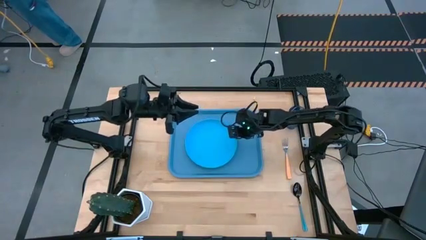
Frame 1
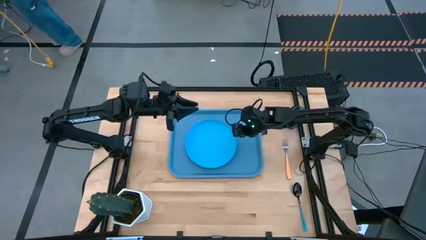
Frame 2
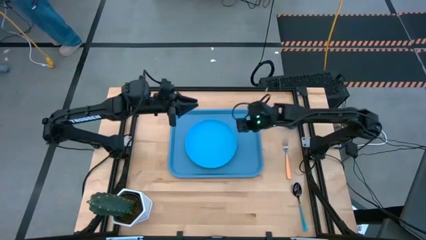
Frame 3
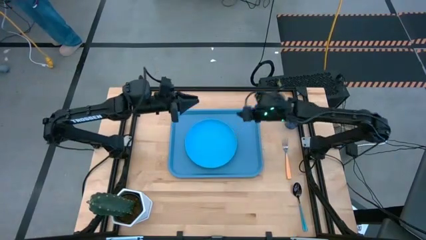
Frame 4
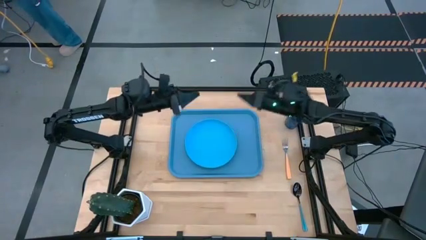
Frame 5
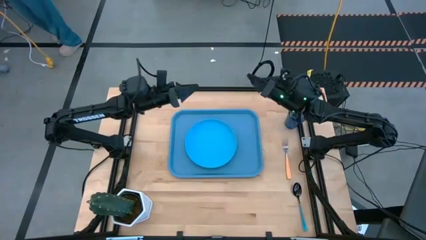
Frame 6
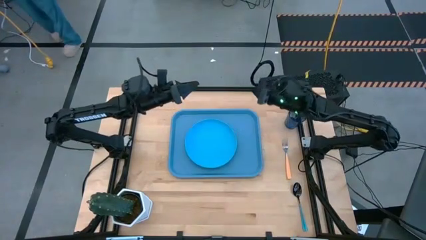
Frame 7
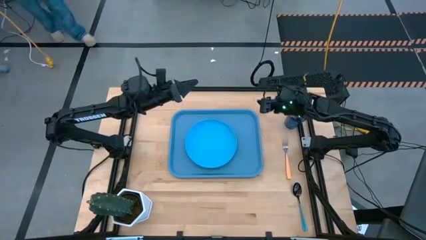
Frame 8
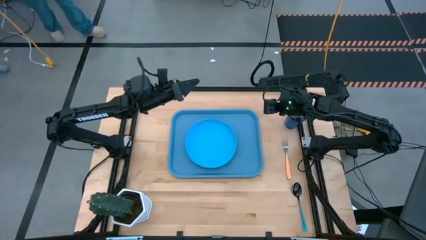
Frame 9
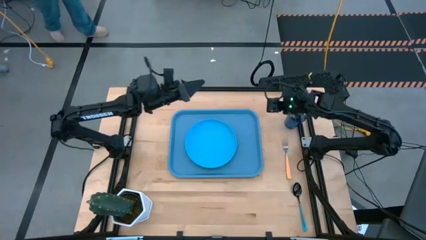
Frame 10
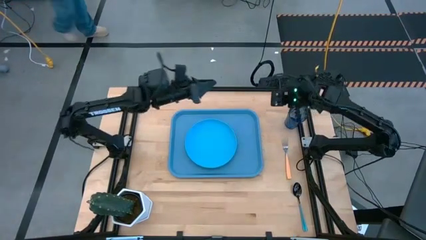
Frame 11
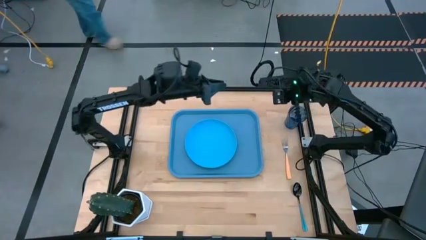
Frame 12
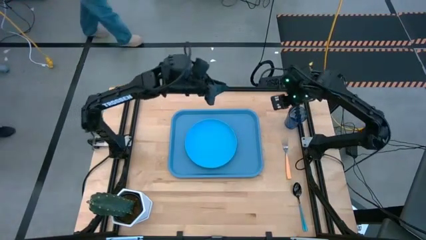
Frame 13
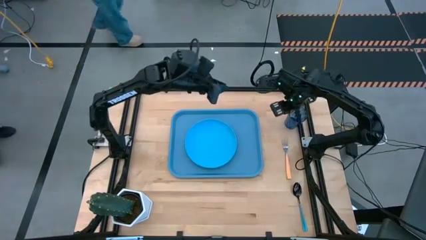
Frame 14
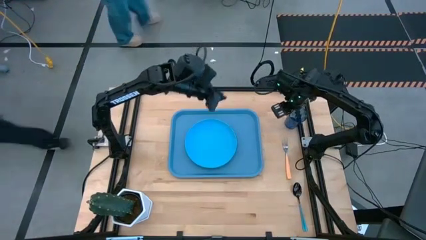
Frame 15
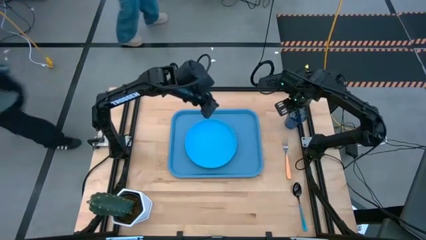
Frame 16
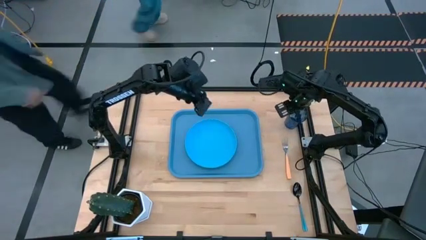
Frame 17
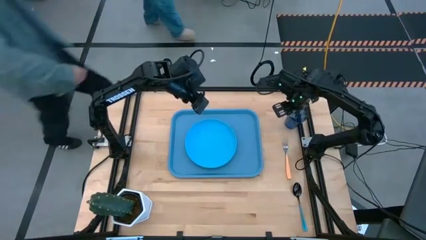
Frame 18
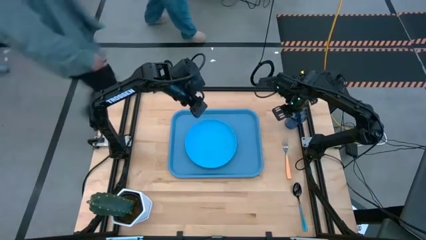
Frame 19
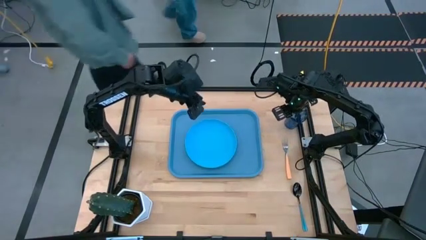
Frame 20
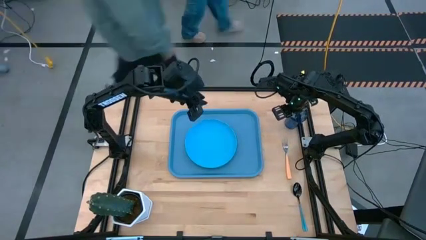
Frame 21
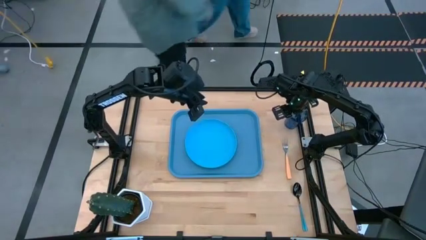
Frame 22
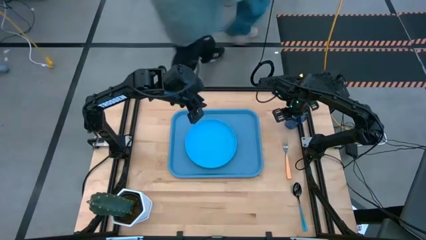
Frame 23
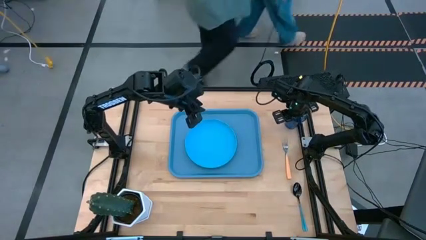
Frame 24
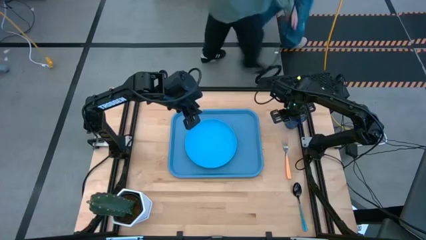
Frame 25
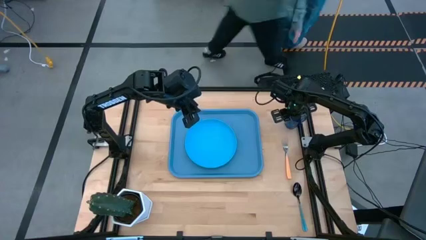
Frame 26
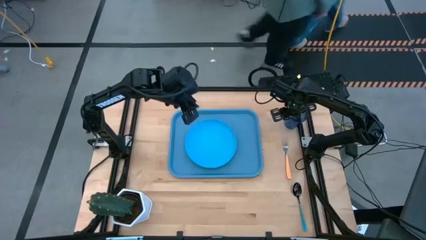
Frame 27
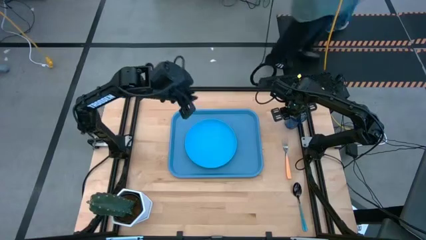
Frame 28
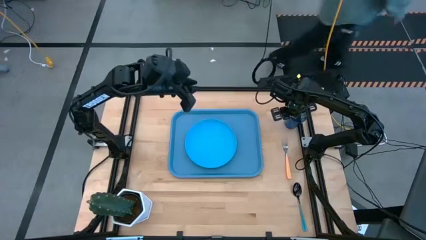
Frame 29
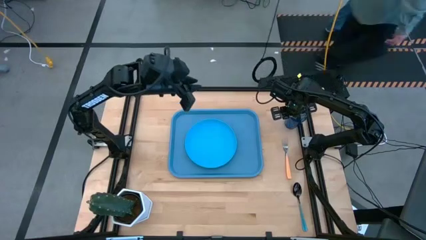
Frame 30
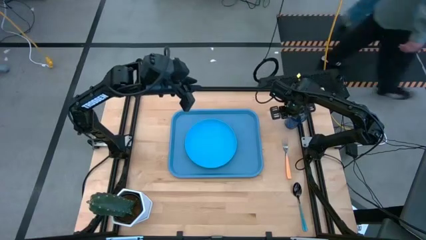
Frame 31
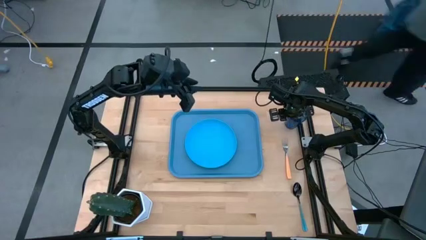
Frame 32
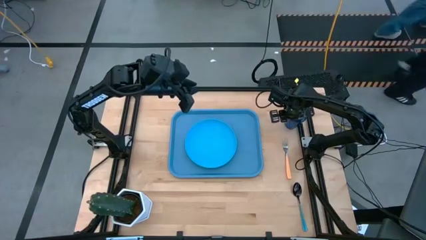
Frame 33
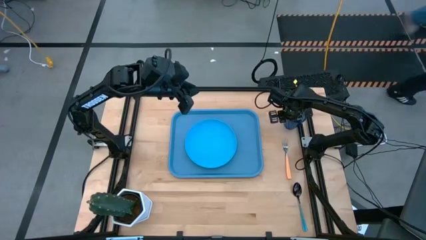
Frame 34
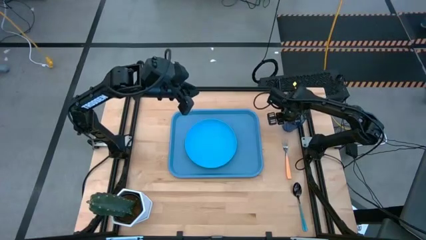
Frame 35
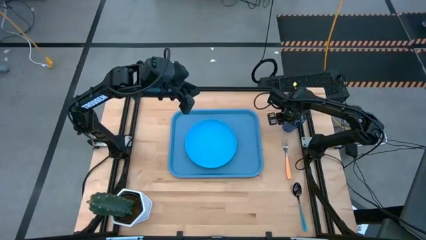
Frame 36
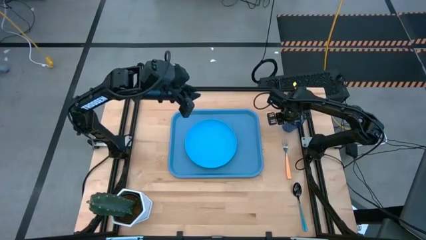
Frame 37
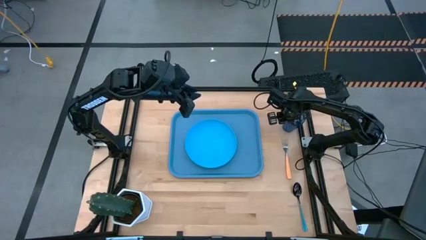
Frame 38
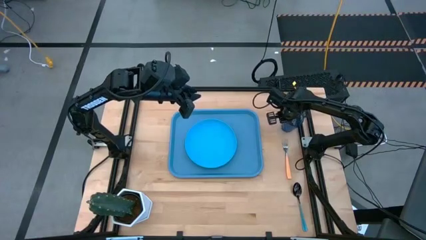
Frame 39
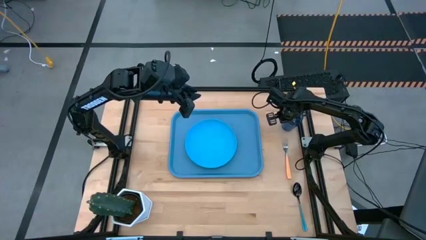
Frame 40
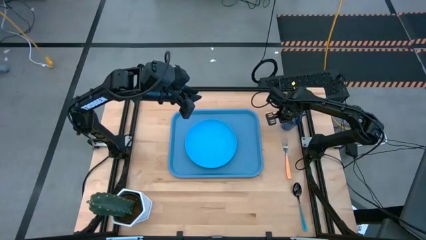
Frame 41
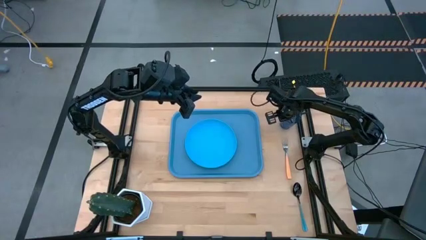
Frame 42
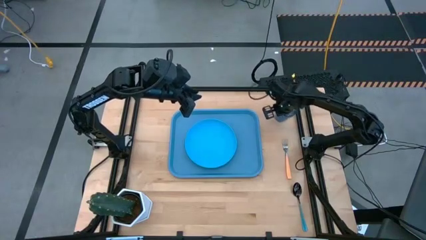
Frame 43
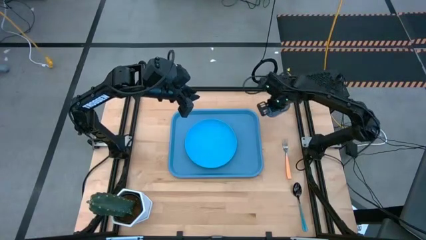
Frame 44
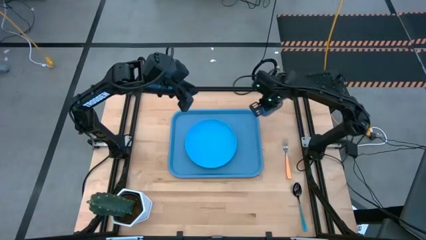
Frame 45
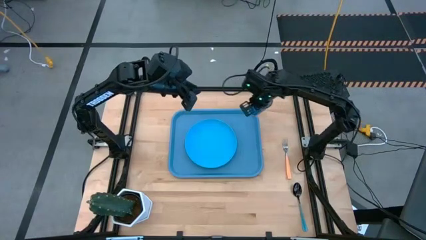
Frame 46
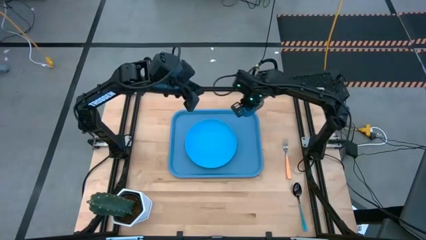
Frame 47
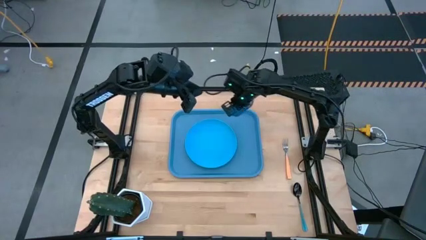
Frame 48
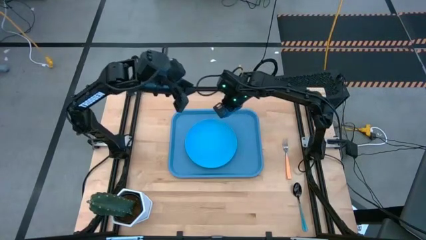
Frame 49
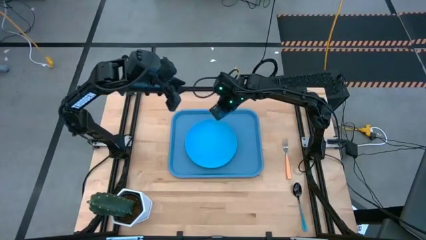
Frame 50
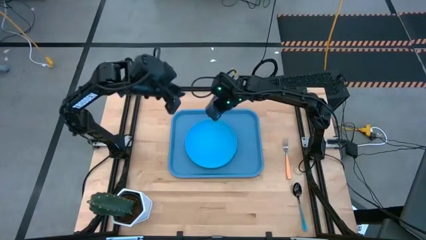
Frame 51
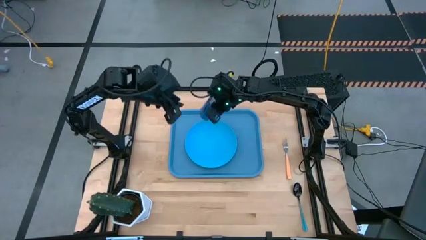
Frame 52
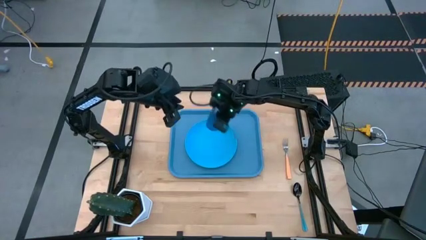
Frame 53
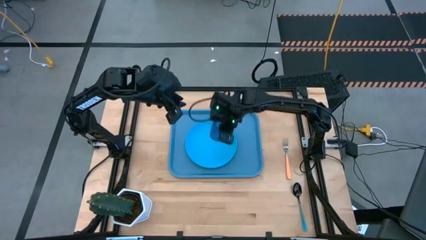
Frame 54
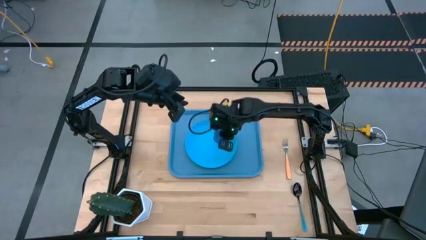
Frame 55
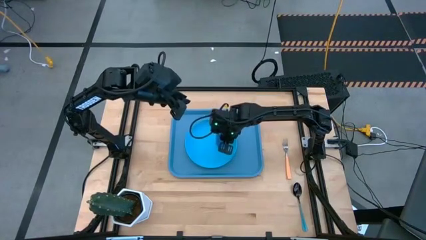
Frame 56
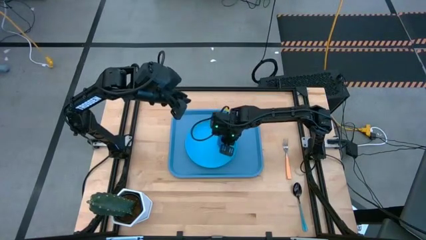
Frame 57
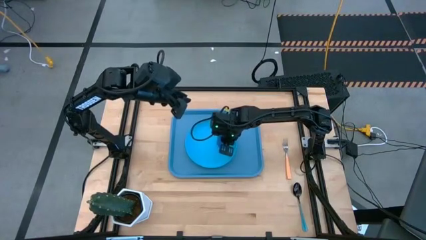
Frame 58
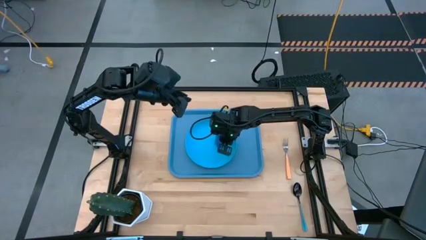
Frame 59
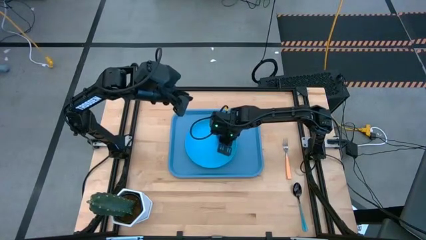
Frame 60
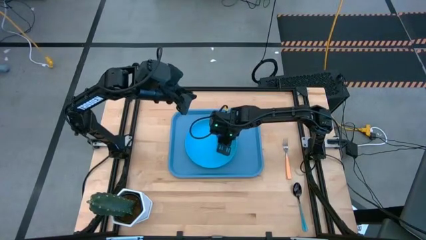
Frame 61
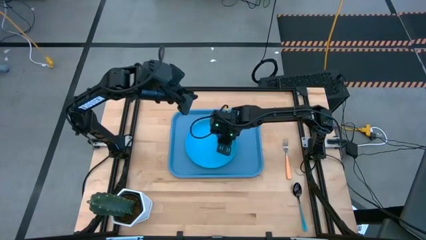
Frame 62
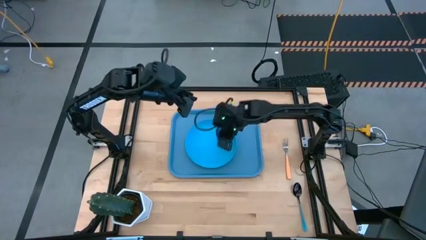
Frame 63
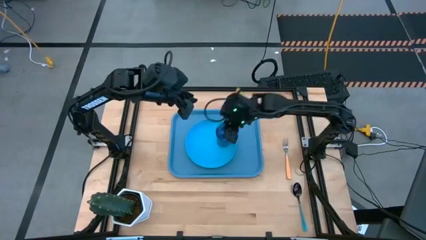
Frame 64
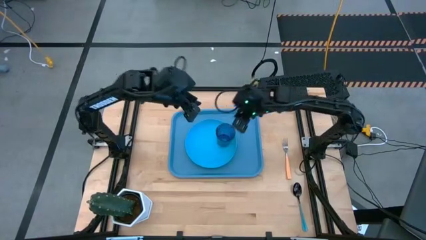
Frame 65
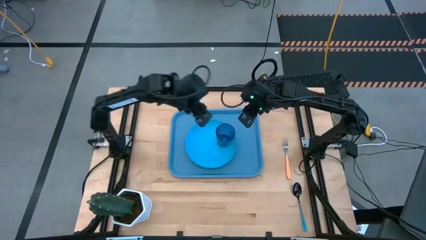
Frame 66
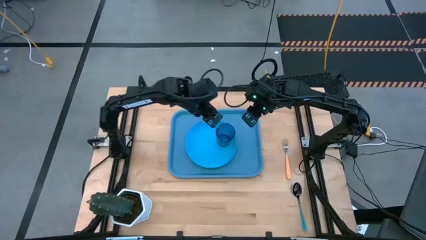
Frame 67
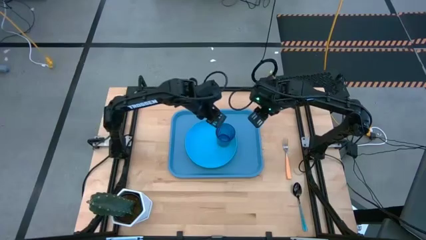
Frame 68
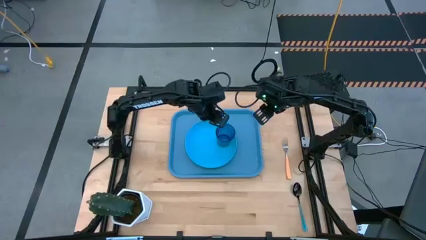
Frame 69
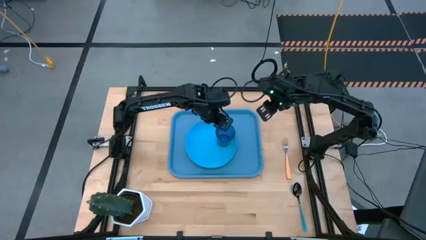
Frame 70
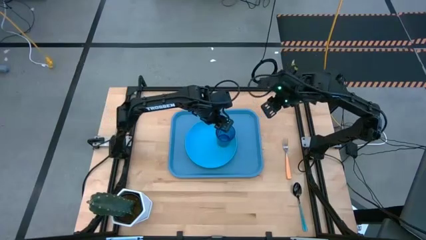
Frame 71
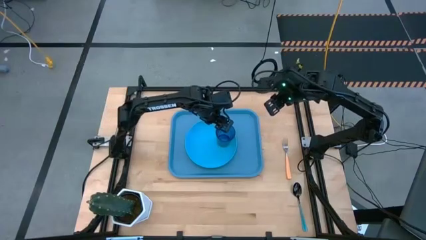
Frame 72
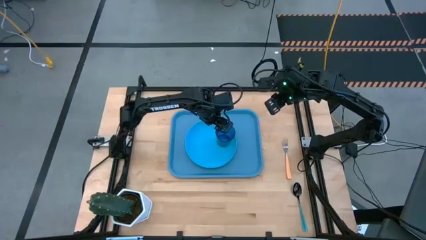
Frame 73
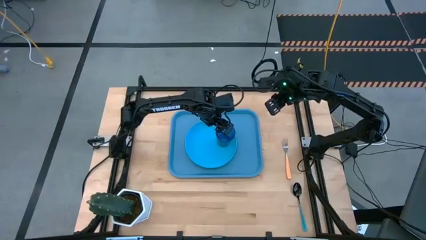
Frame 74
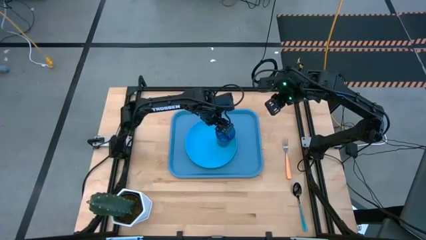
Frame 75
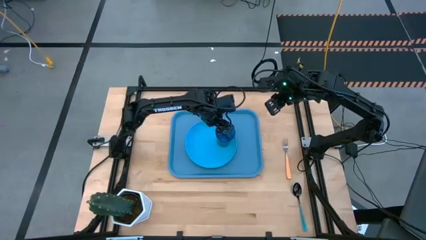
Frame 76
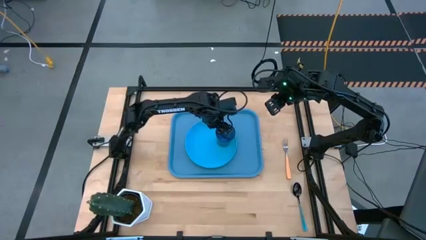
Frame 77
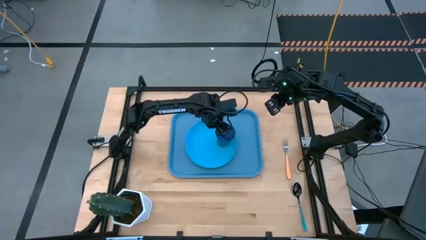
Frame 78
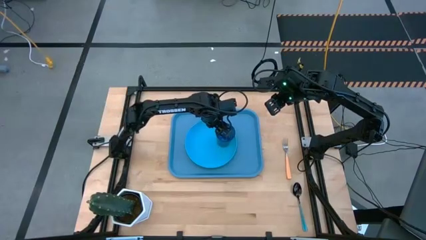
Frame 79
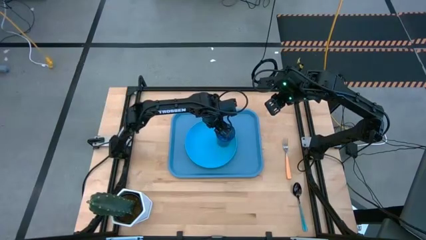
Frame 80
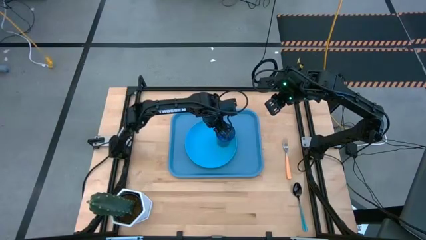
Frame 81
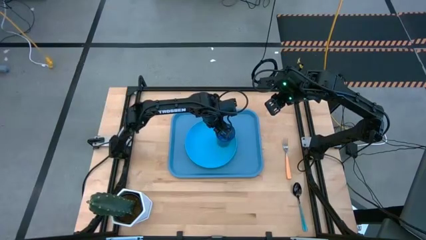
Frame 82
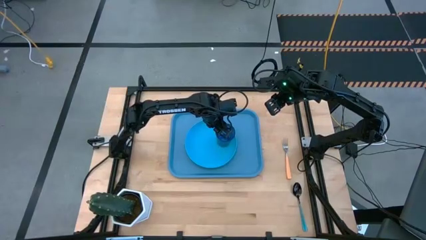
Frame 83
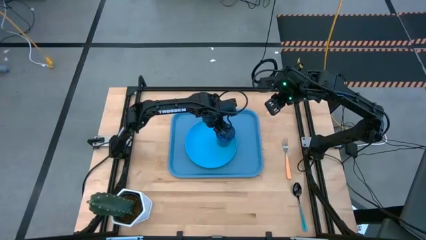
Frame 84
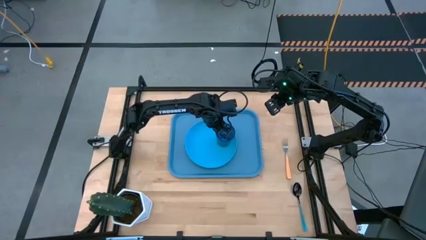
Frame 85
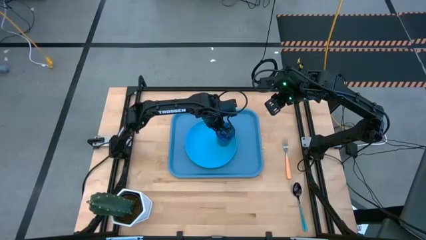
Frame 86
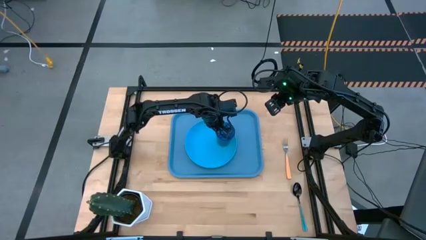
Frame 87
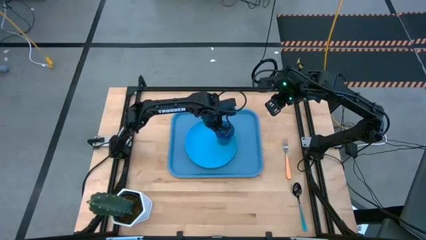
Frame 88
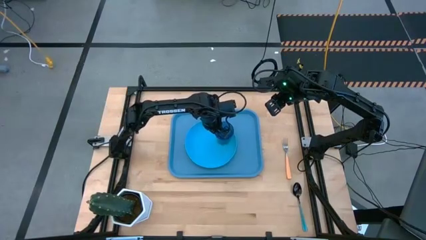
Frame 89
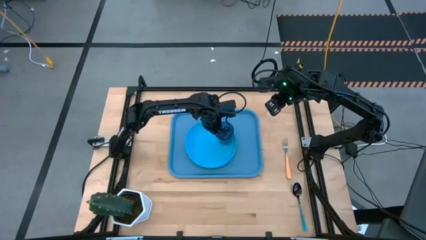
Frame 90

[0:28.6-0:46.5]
Task: Pick and place plate/cup/fork/spoon on tray
Put the blue glass on the blue serving tray to the top left of the blue plate
